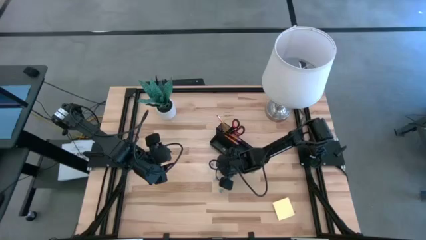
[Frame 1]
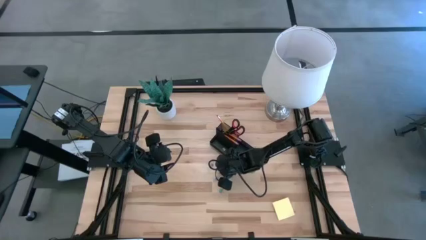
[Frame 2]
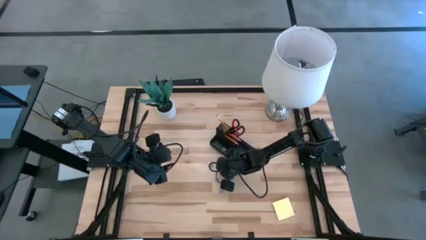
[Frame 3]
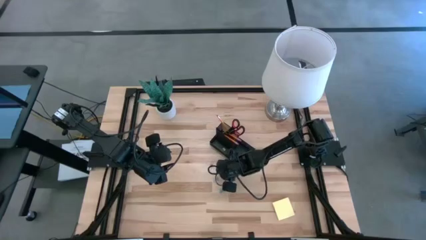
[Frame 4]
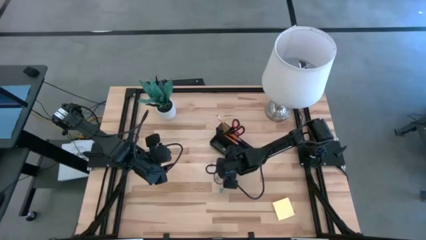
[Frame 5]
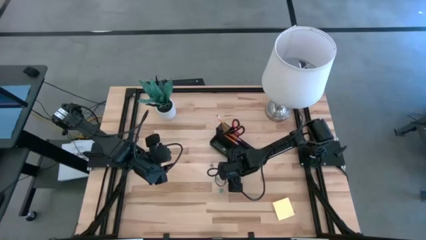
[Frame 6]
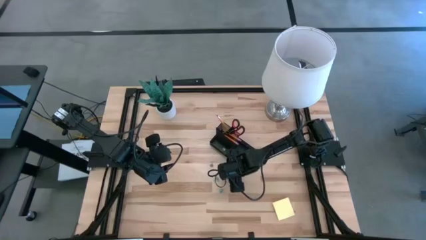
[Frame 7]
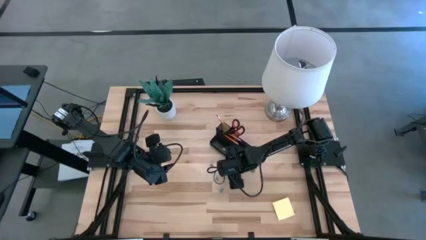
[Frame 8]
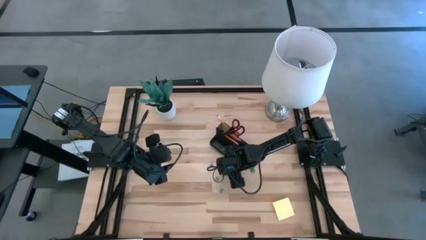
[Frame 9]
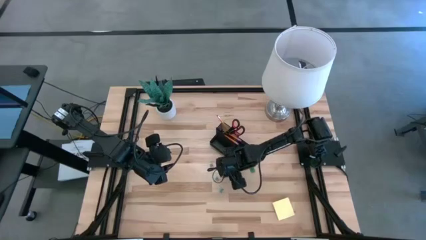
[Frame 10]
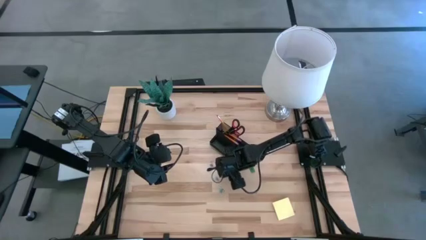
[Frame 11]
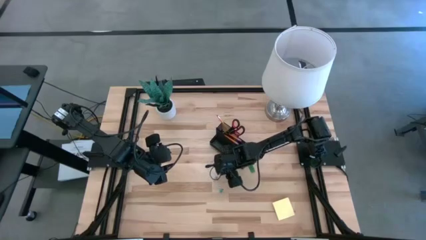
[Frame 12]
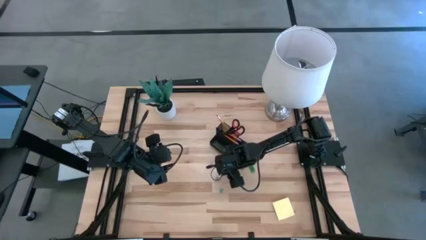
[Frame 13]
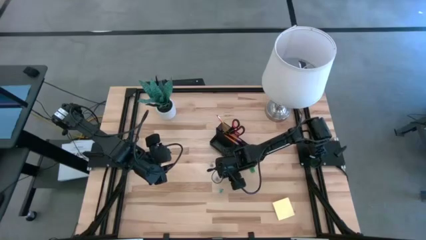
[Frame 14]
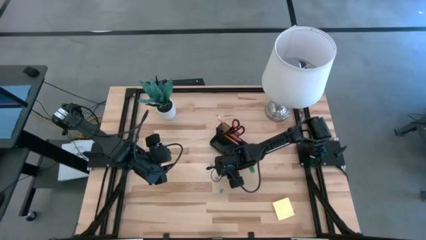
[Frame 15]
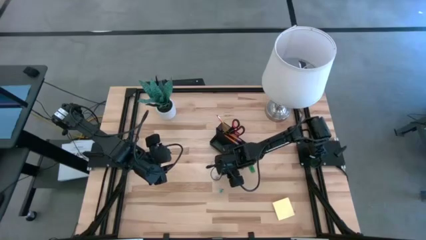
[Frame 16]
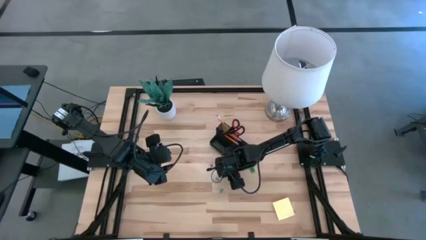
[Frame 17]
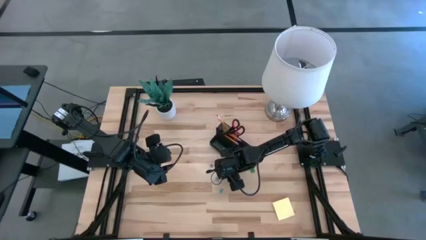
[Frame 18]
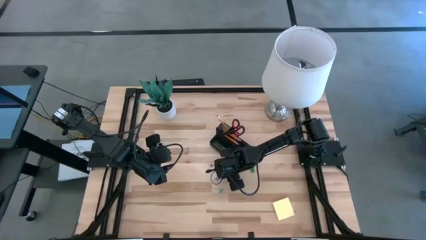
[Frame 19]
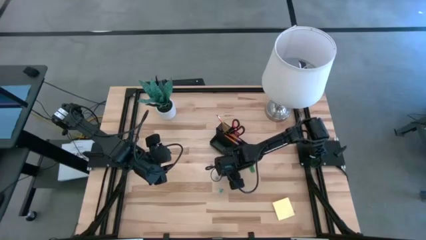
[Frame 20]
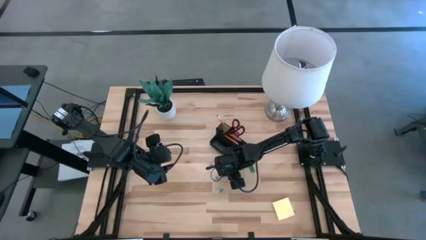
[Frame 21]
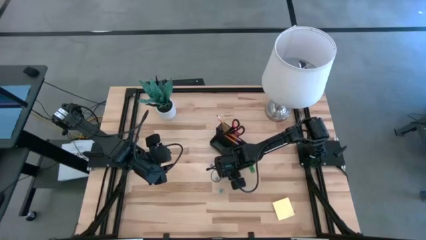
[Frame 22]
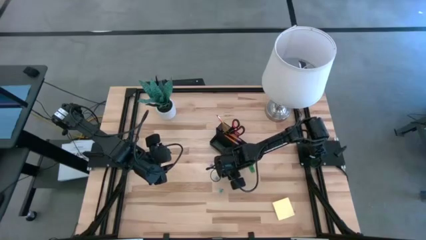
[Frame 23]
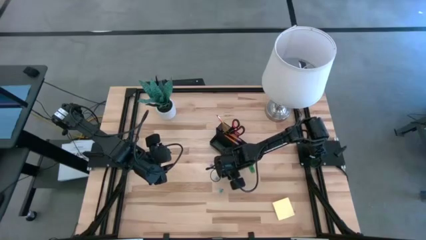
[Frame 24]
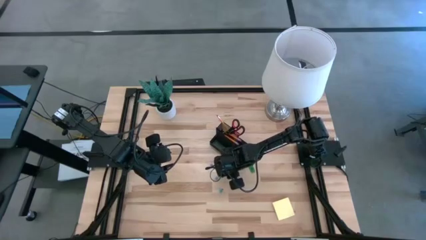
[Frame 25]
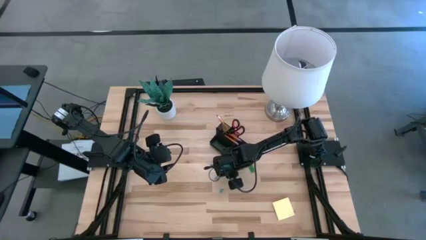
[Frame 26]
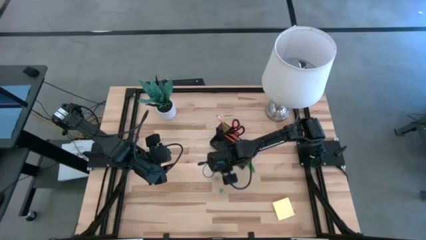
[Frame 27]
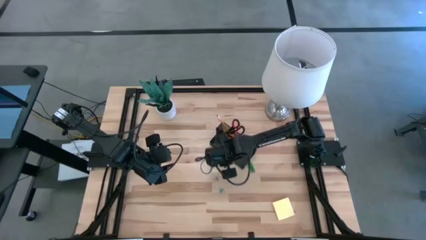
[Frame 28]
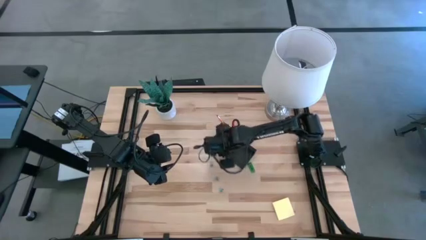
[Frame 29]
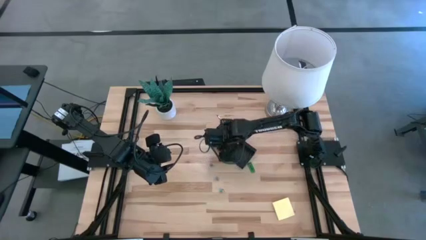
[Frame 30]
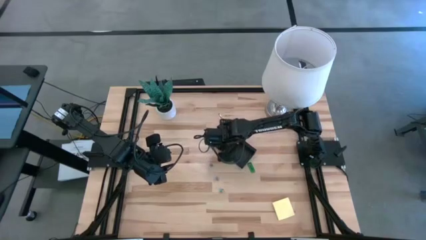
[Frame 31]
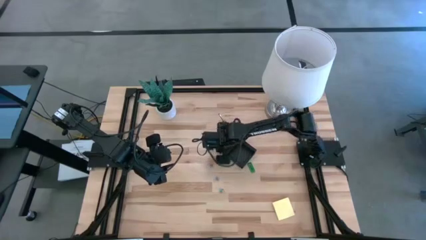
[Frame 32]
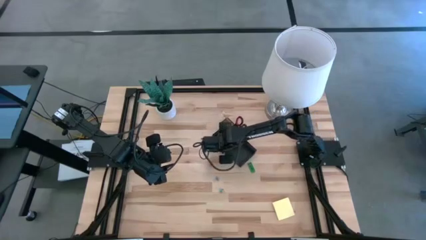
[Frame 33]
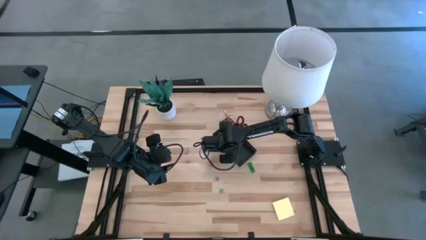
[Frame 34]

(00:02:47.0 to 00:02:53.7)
Task: Pick and place office supplies into organizer
Put the yellow binder clip into the black desk organizer

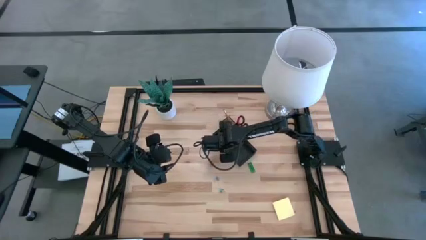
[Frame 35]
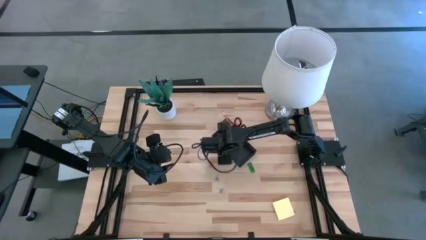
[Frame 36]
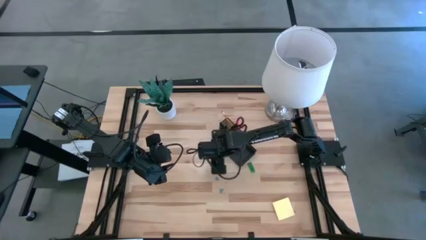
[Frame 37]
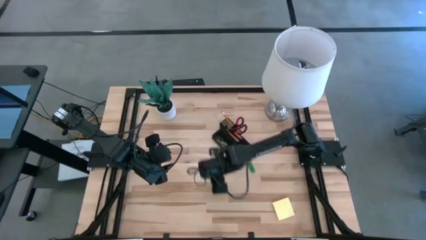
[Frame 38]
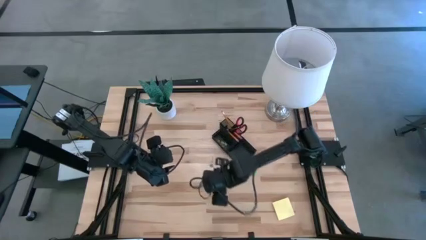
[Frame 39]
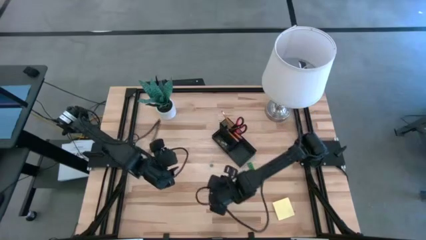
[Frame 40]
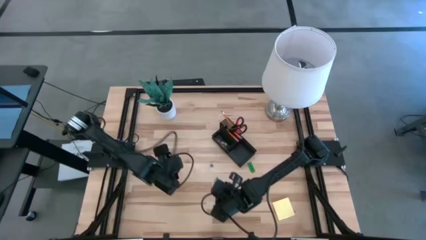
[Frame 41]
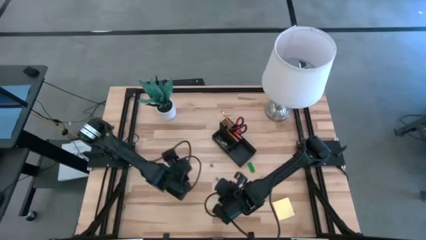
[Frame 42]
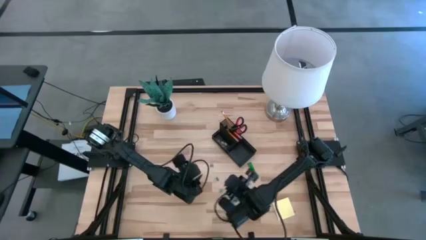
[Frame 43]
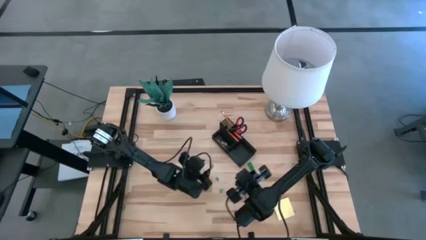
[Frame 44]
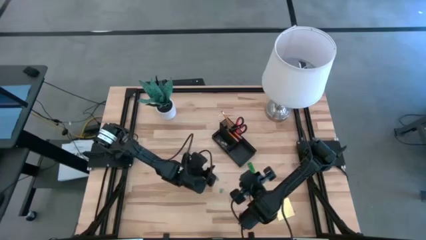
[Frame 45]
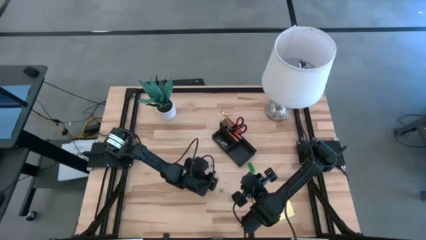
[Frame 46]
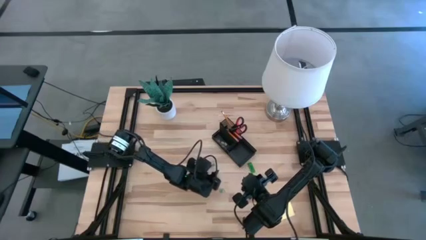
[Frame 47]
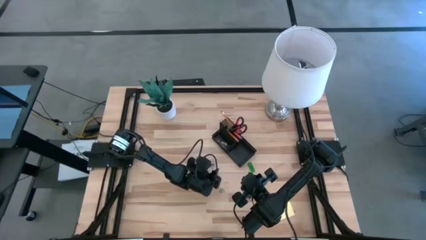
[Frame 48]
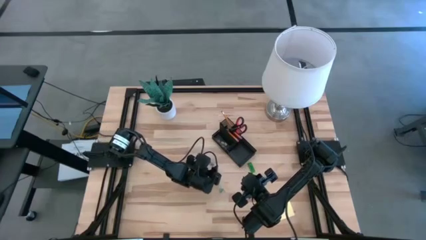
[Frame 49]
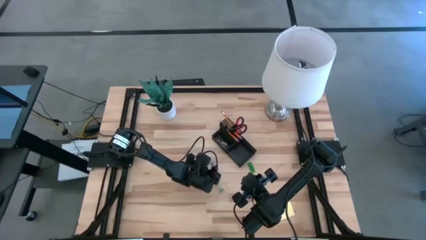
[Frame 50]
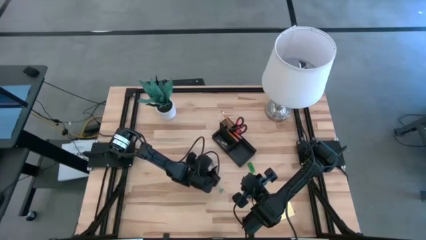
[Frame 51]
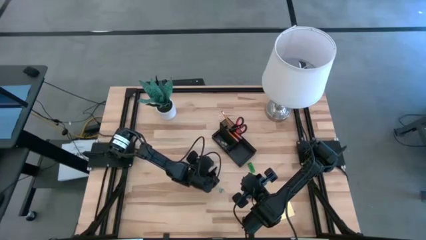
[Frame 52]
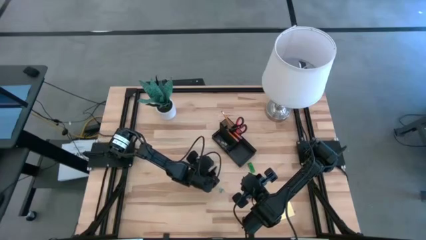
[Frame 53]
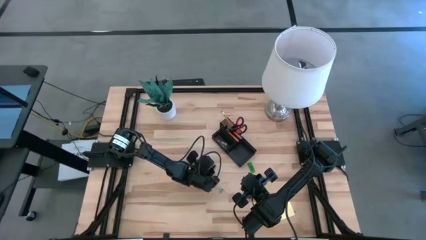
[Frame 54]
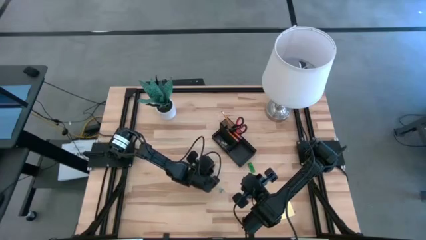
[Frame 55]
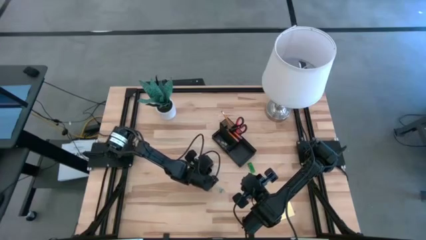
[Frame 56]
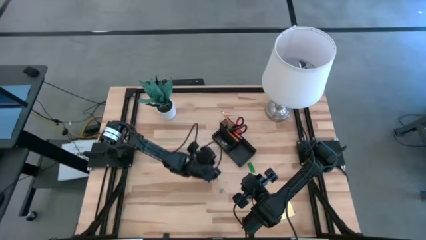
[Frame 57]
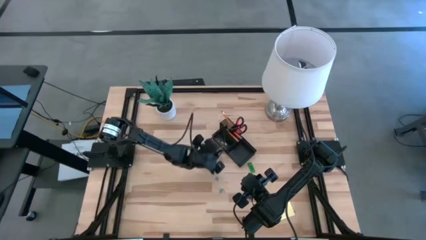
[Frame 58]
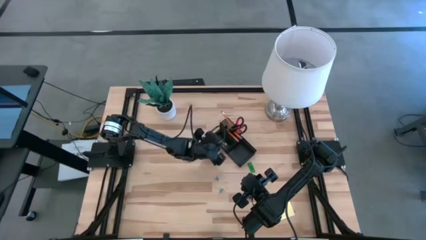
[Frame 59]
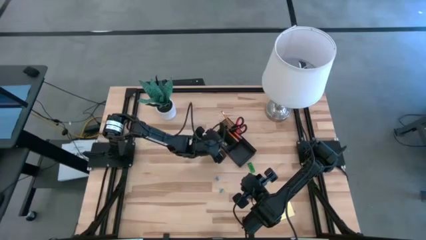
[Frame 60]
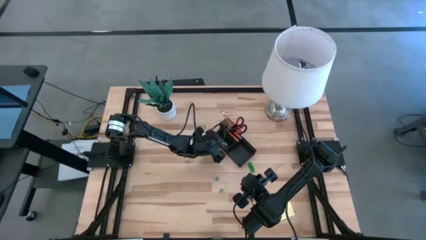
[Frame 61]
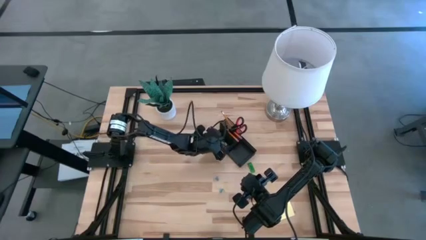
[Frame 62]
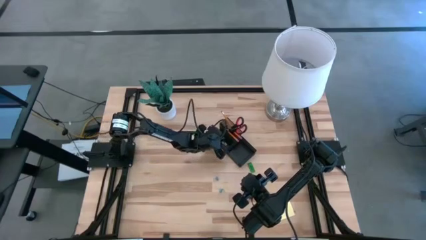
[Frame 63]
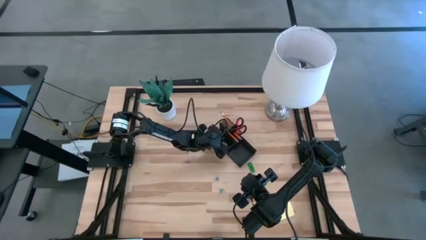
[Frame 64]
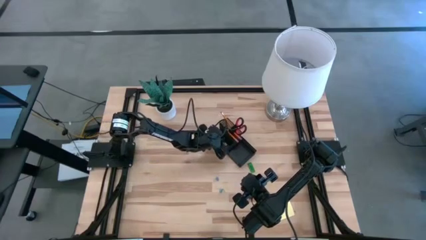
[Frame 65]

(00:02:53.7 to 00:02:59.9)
Put the top blue binder clip into the black desk organizer

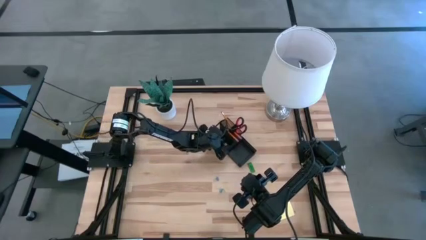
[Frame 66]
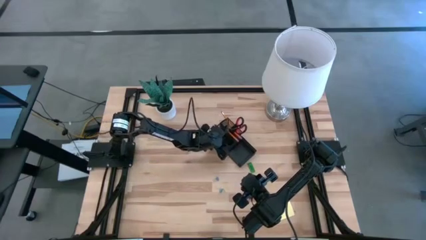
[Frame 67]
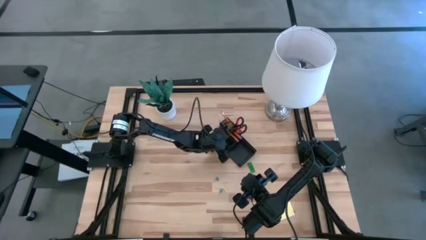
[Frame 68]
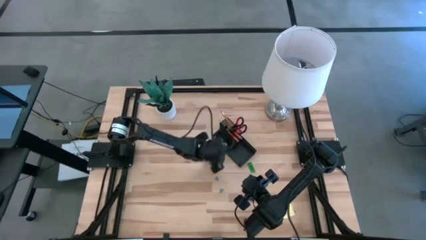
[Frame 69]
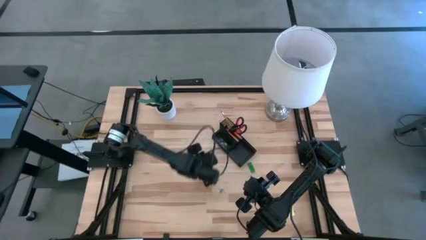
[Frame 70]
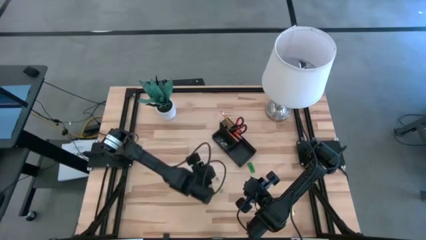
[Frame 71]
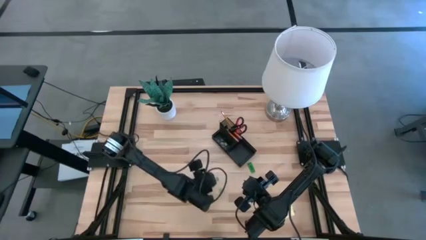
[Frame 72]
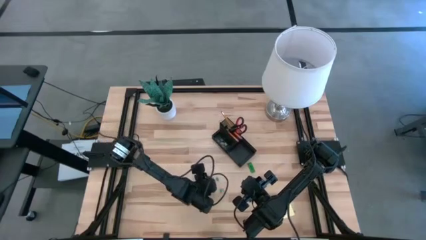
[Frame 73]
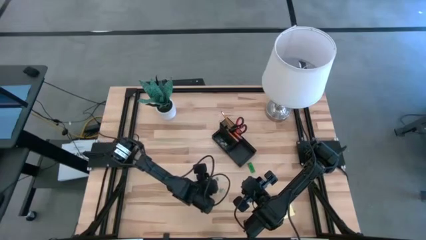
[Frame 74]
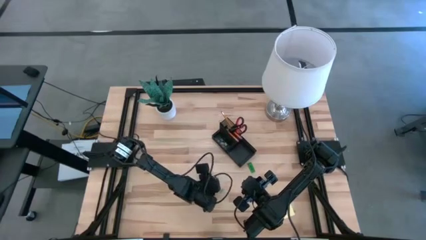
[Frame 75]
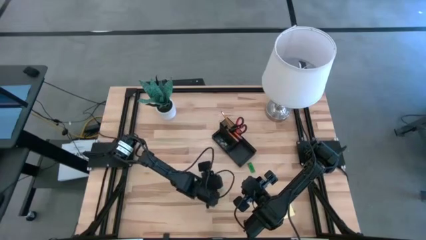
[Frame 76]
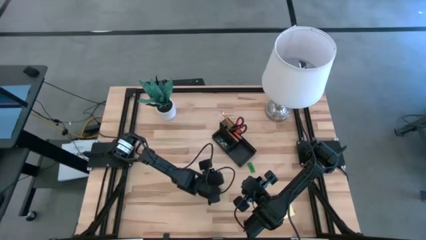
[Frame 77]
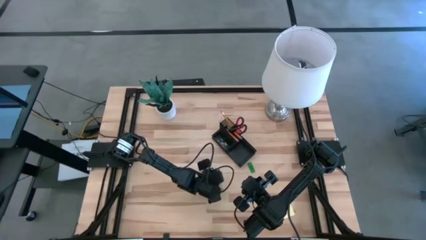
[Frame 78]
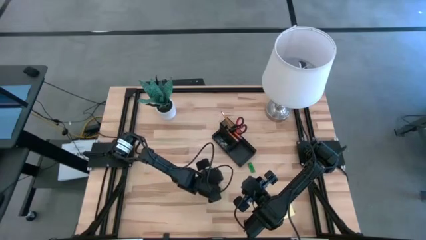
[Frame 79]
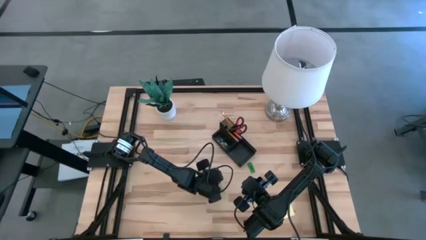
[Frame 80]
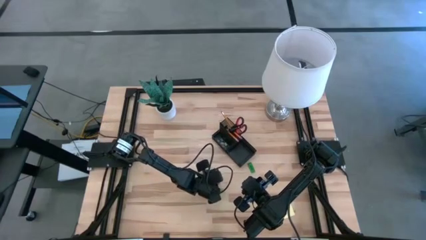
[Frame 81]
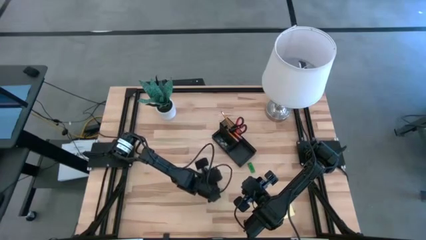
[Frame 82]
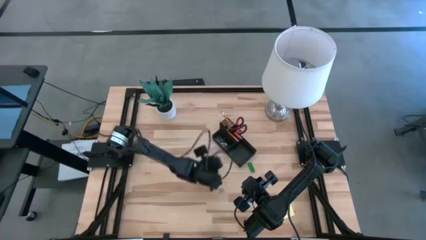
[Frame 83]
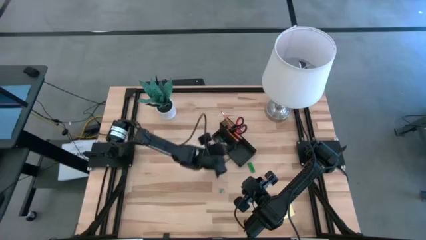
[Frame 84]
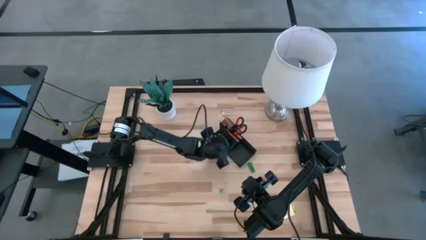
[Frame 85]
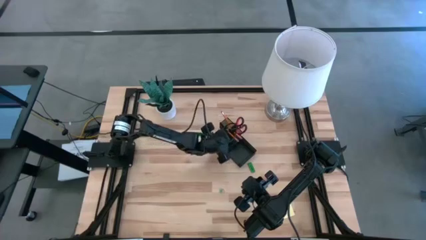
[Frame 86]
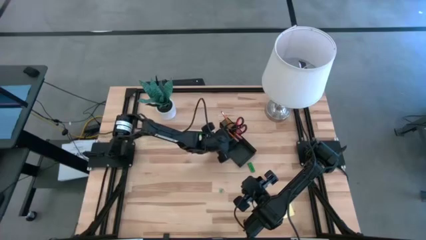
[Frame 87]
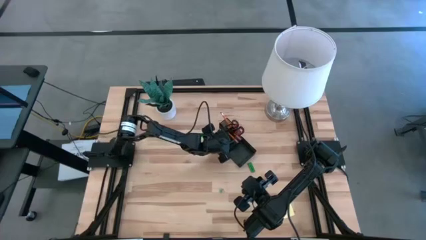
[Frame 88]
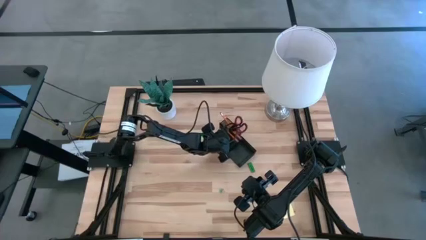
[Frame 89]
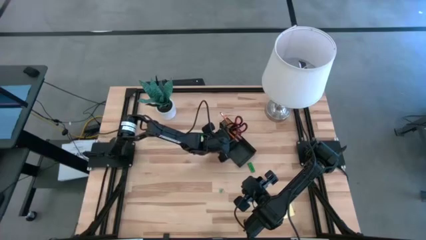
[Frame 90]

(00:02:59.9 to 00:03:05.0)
Put the top blue binder clip into the black desk organizer
